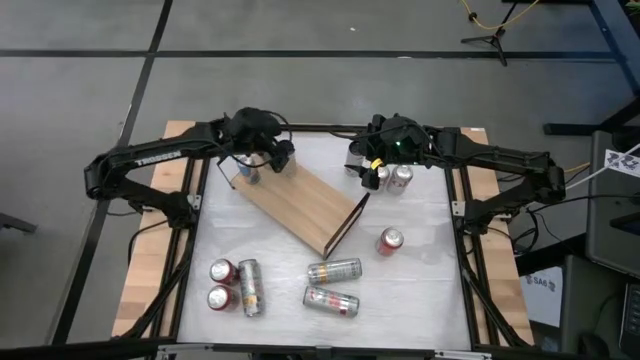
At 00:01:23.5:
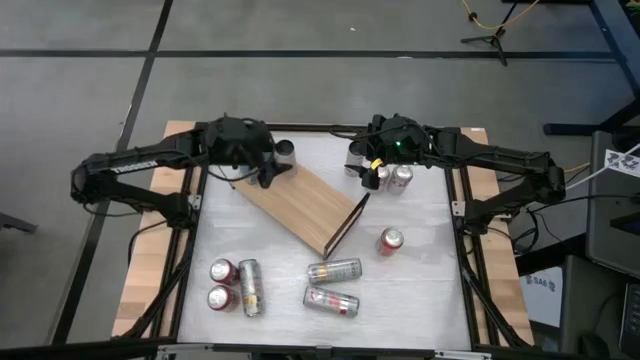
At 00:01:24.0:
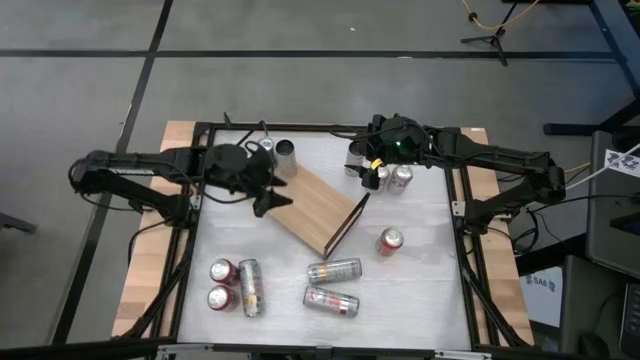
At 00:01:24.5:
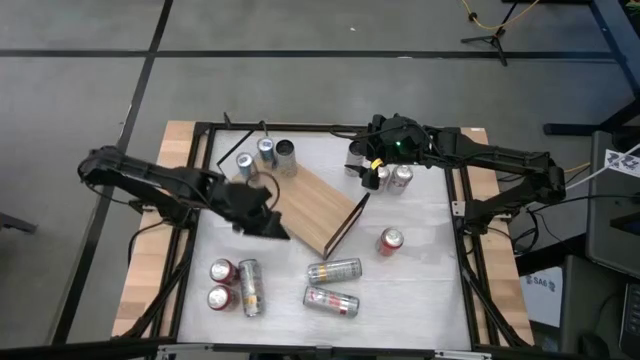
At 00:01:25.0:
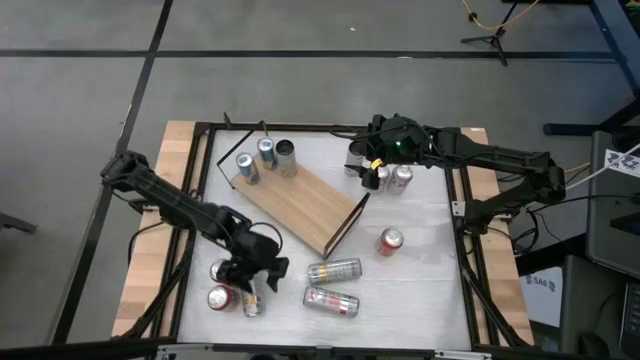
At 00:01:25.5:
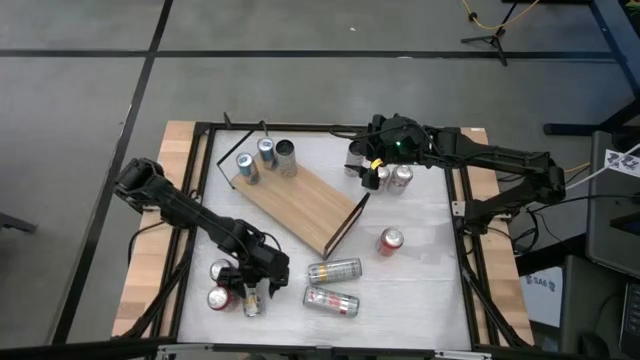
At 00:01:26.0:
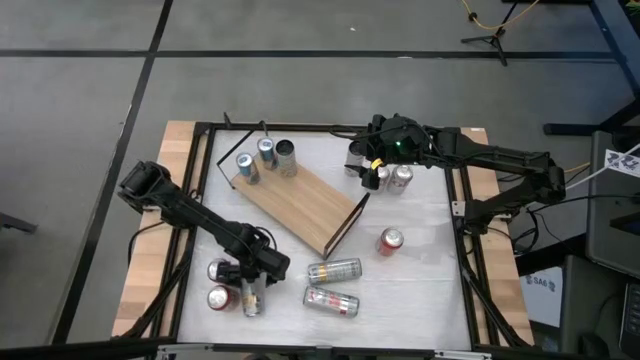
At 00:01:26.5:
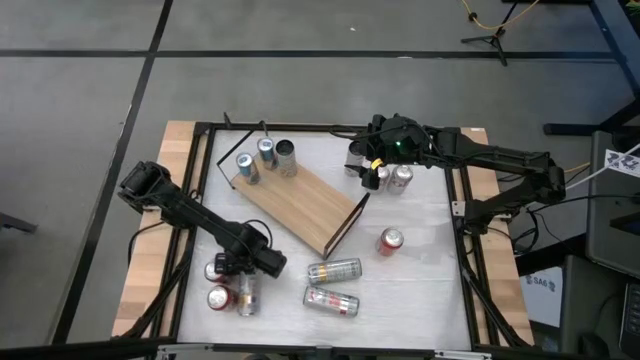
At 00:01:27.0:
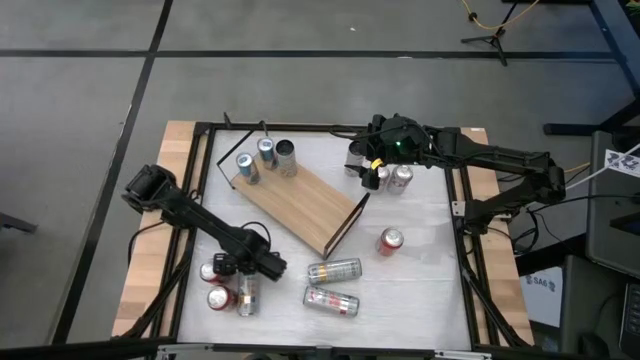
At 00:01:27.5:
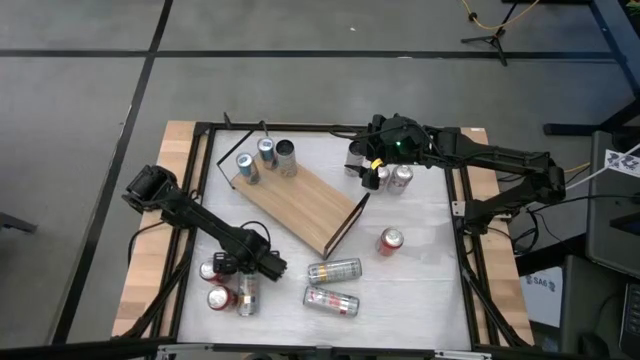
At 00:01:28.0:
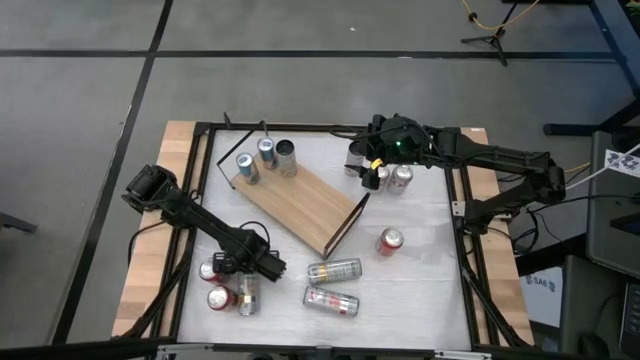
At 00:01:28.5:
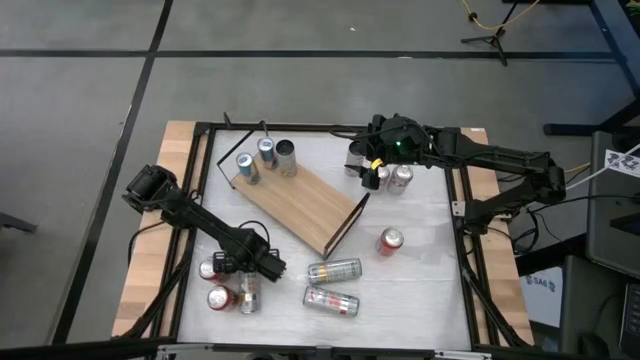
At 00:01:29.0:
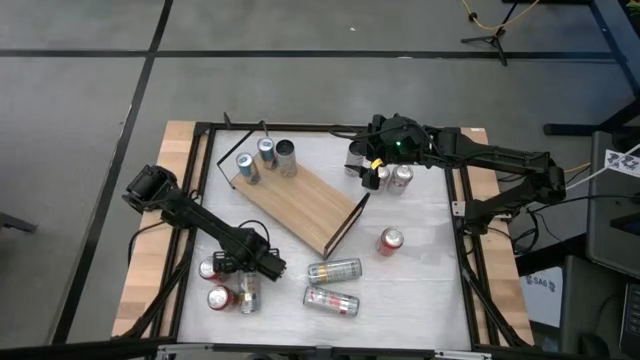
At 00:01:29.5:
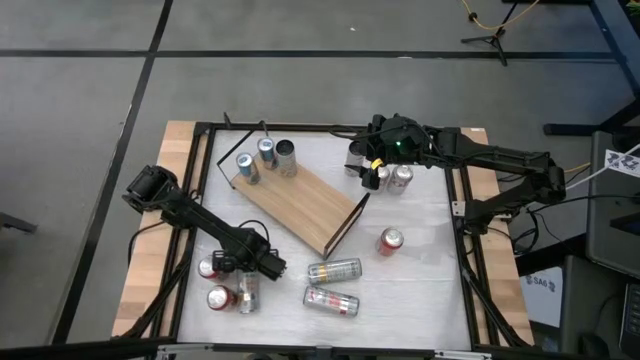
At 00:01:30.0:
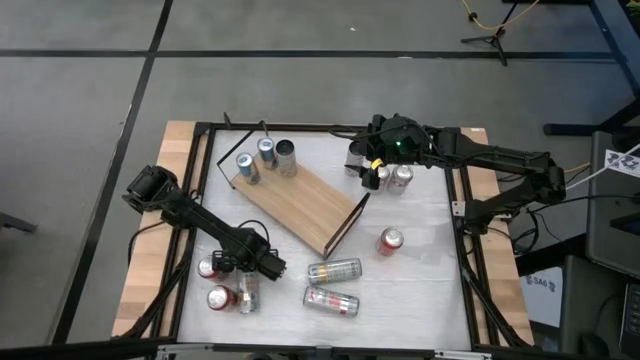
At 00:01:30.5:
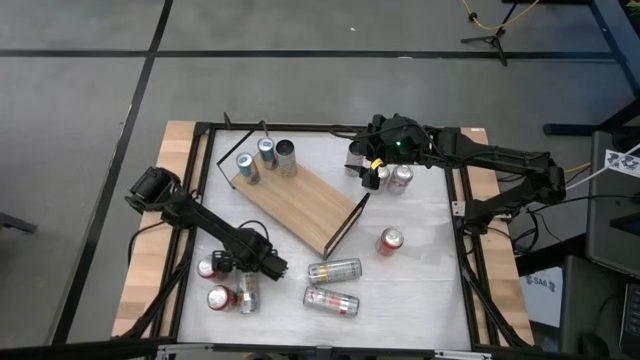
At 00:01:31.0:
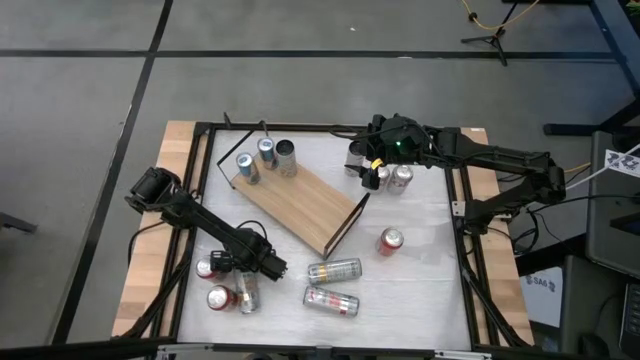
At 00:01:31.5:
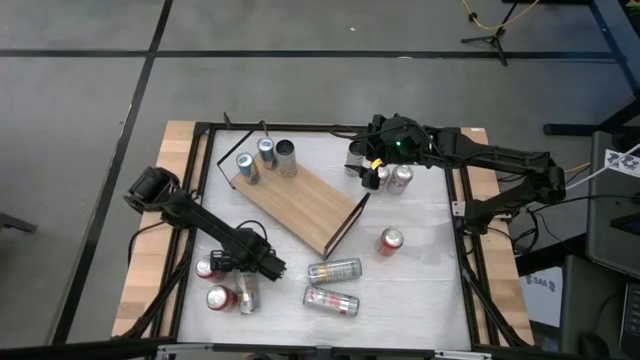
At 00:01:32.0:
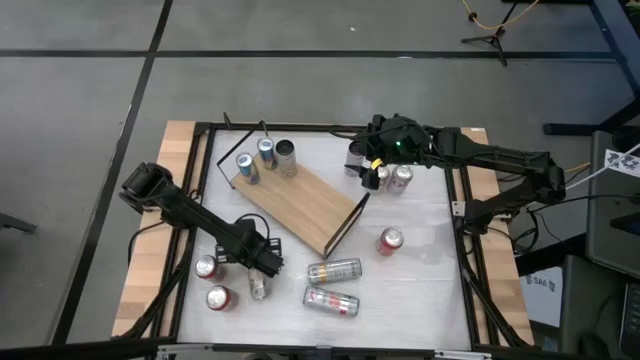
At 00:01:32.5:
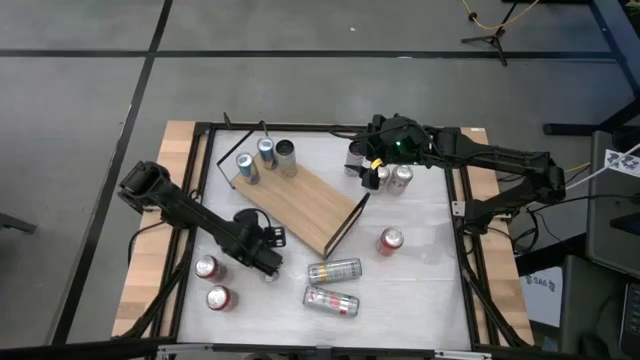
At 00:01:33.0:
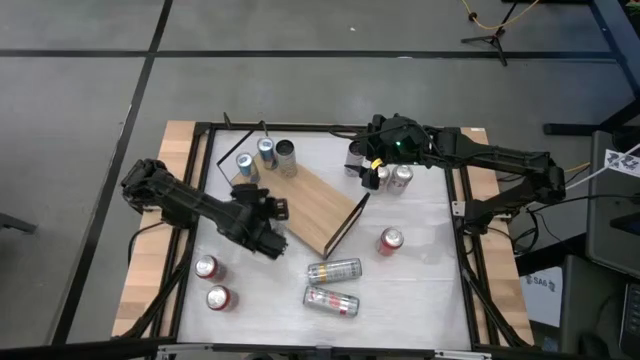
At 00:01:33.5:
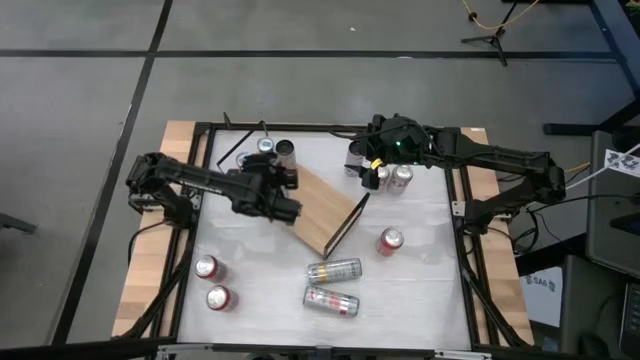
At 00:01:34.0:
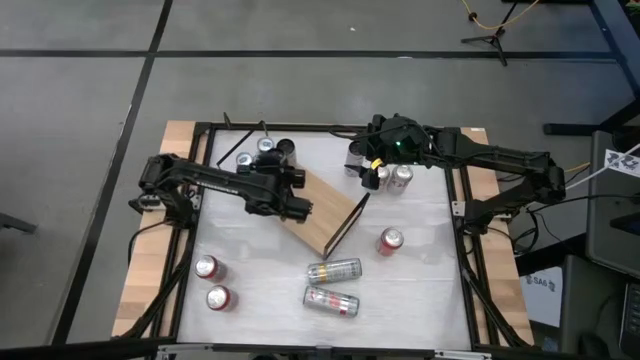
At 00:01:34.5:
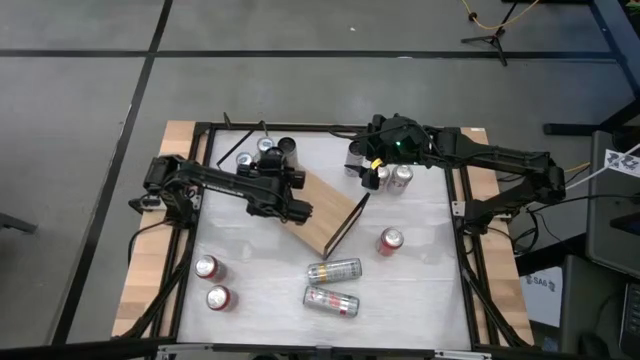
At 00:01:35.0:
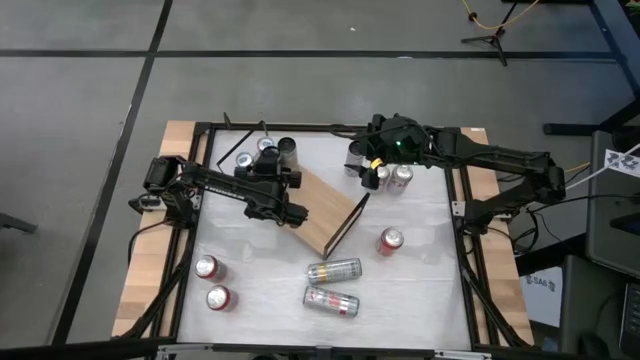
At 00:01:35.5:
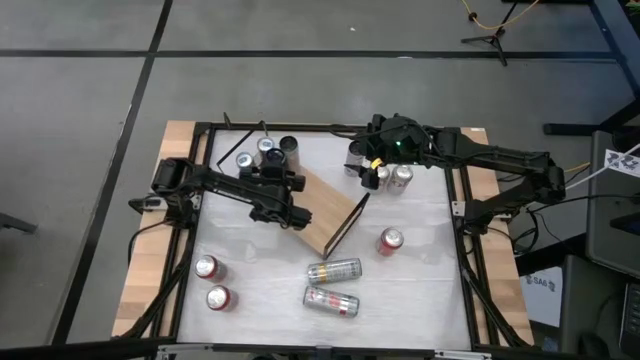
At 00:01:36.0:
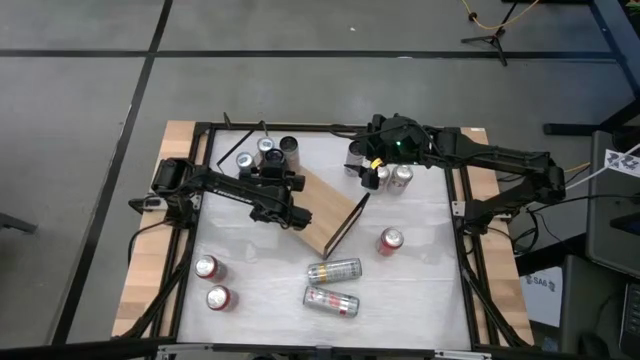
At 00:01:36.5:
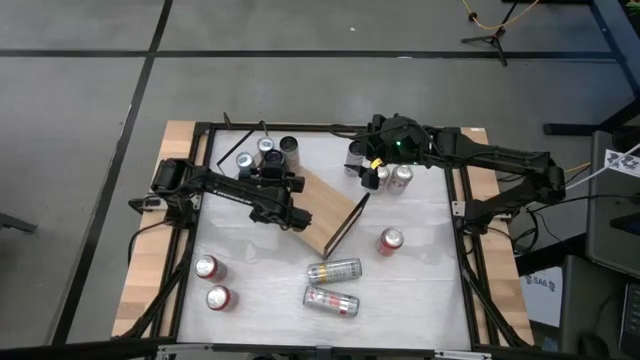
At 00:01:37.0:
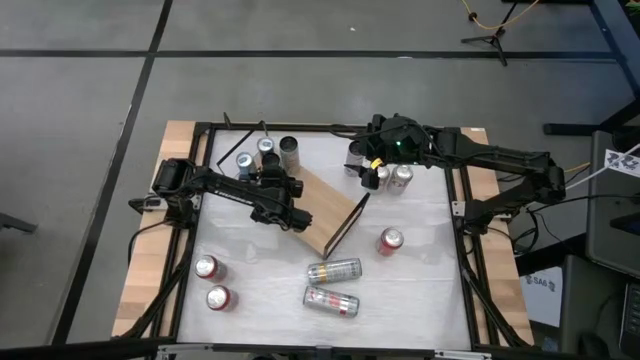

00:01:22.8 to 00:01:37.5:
Task: Place canned beverage on shelf
Put the left white-yellow soda can aligned with the white-yellow soda can on the shelf

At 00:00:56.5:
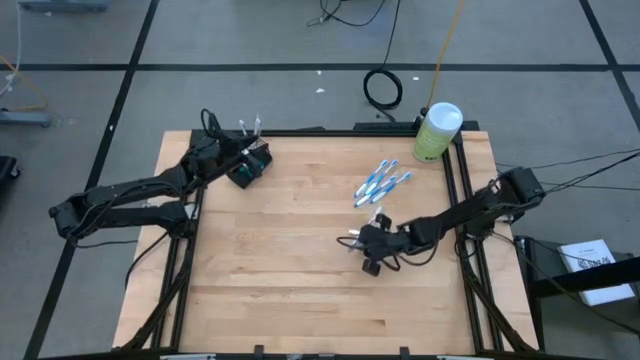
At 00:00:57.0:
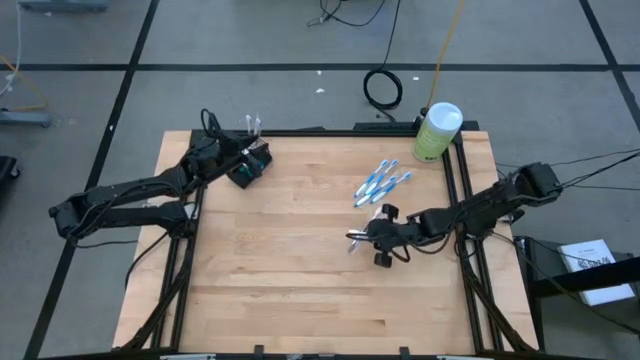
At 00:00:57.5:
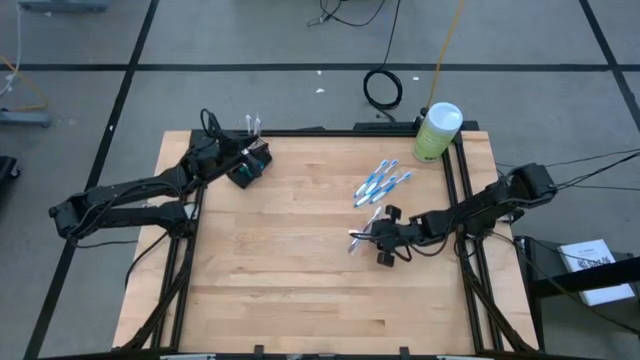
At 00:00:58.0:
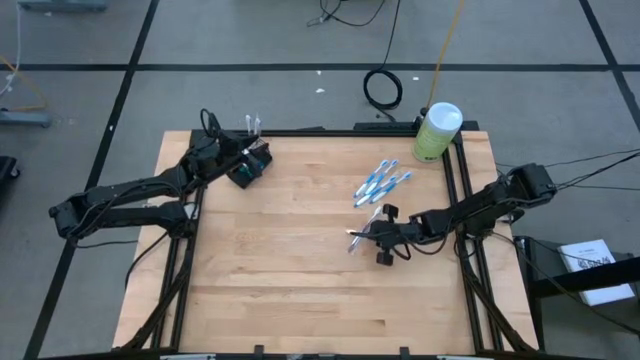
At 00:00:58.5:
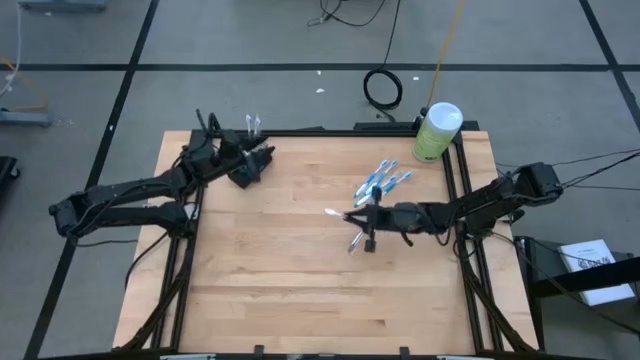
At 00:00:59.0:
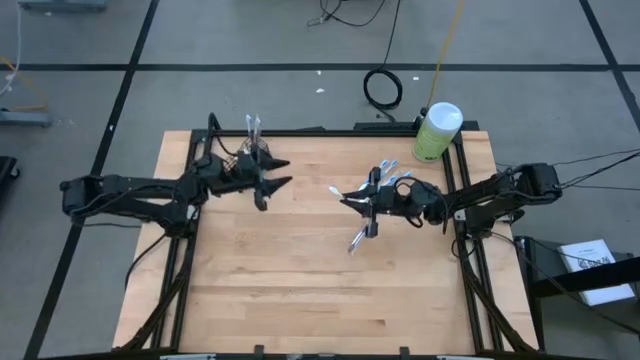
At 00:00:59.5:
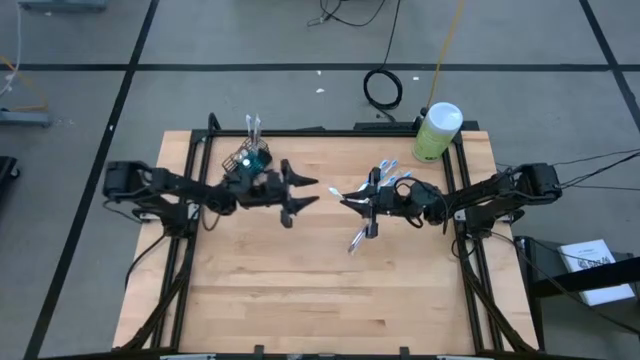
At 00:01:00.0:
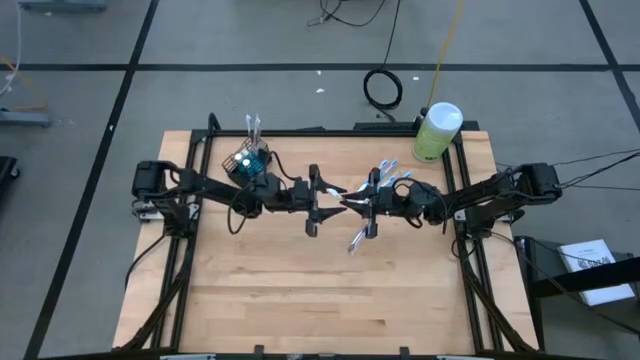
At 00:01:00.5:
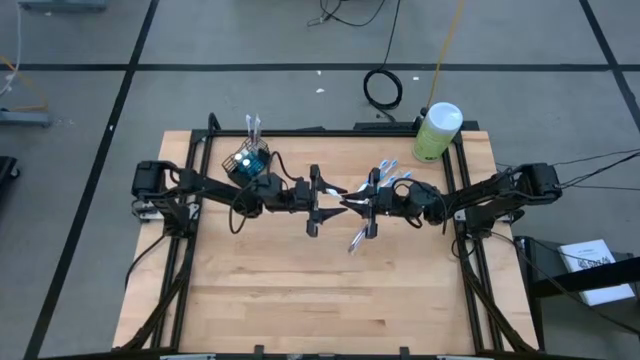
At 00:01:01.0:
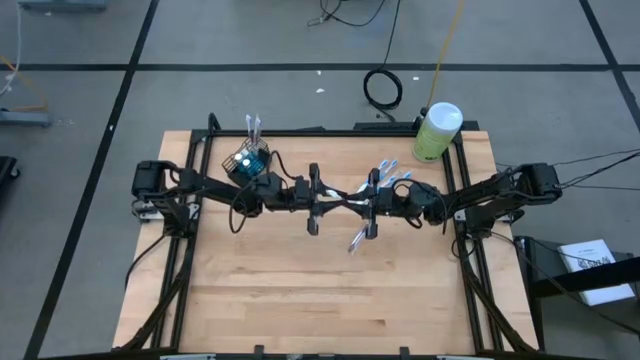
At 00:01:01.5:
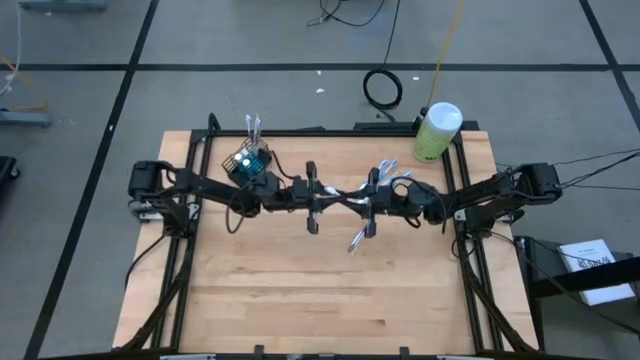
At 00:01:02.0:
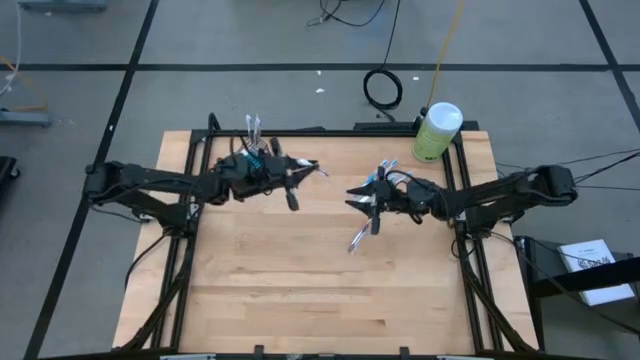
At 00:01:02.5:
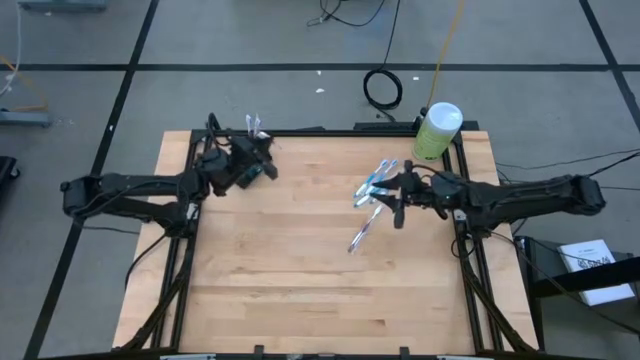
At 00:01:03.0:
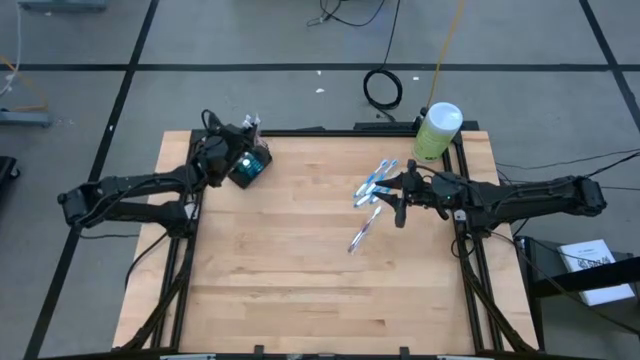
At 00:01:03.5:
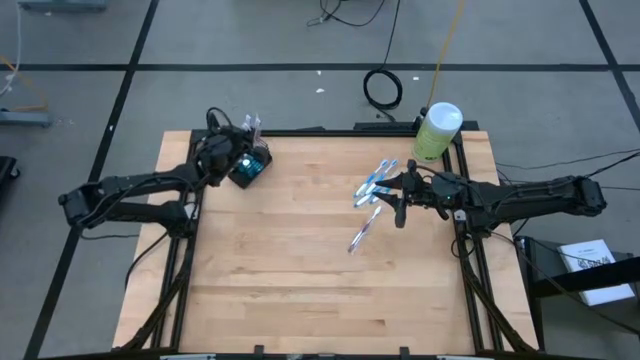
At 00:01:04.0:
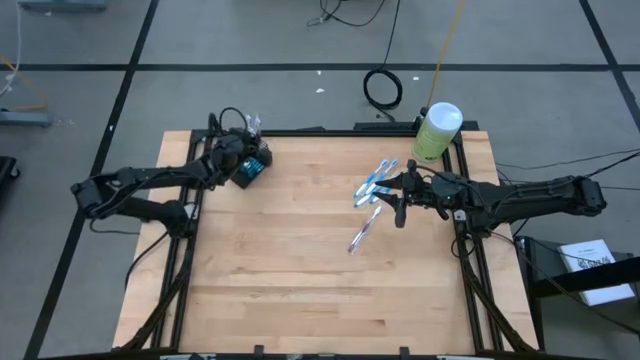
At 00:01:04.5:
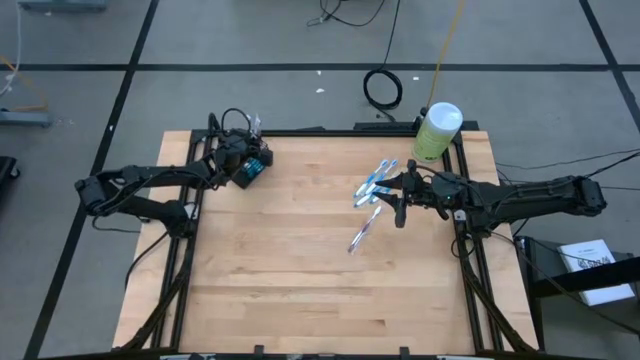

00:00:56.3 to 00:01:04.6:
Task: Pick & Place toothbrushing station
Put the purple toothbrush into the right compartment of the wire organizer
